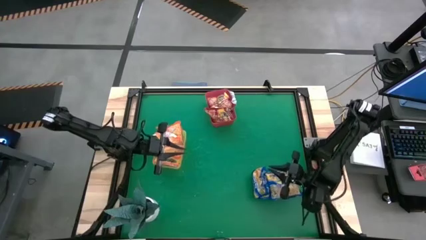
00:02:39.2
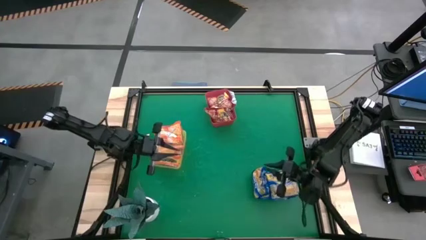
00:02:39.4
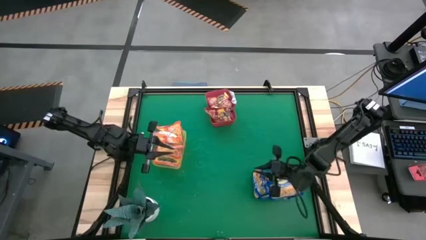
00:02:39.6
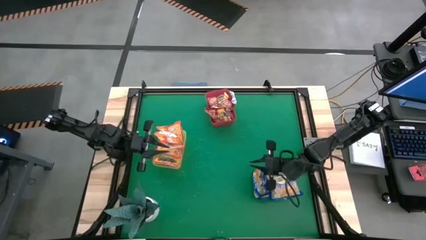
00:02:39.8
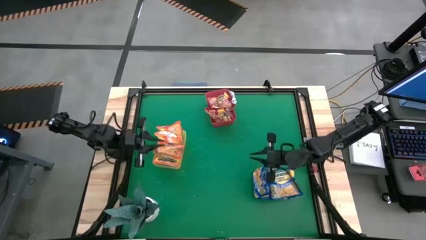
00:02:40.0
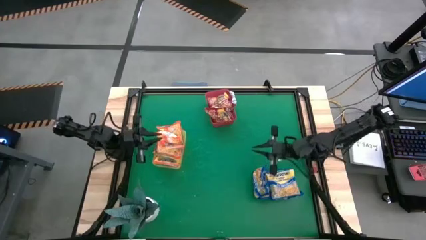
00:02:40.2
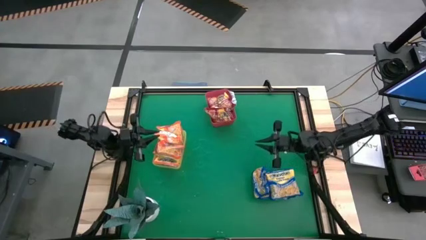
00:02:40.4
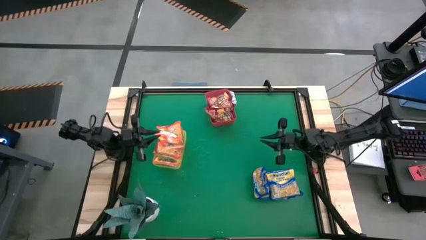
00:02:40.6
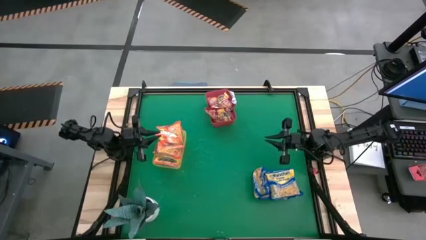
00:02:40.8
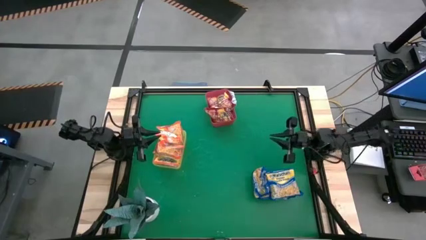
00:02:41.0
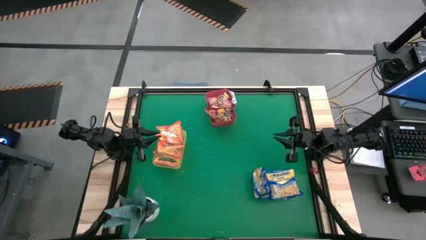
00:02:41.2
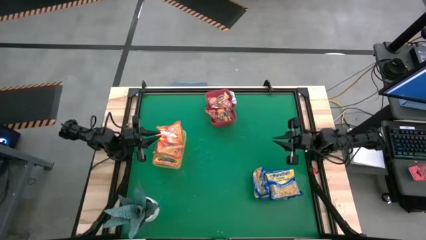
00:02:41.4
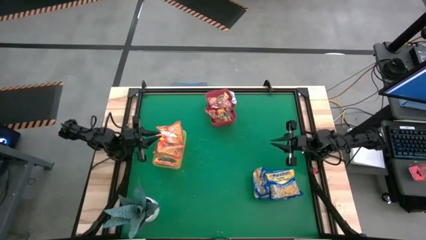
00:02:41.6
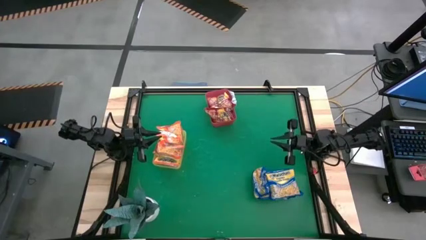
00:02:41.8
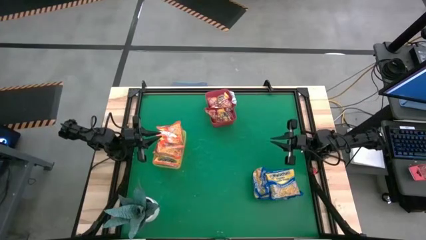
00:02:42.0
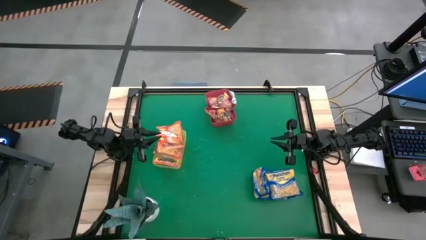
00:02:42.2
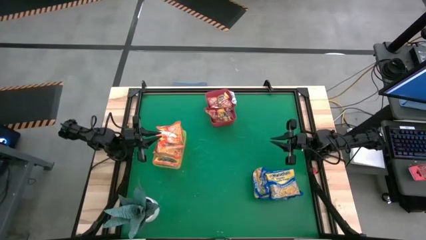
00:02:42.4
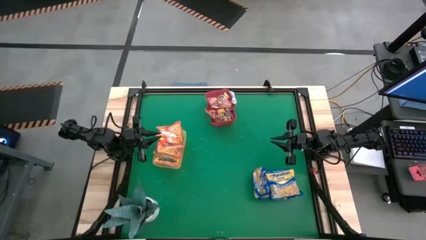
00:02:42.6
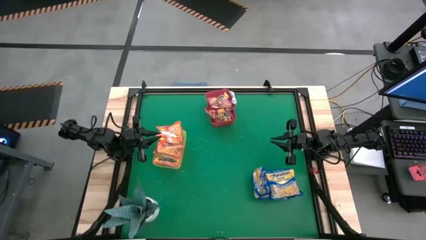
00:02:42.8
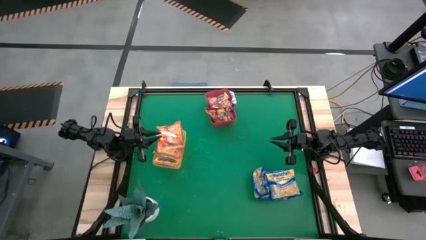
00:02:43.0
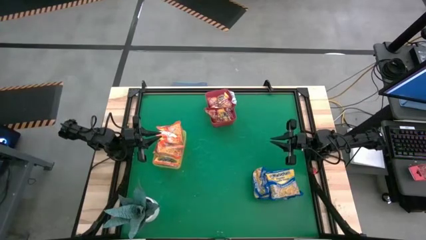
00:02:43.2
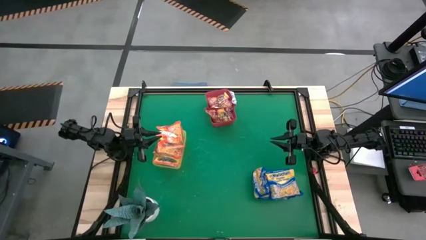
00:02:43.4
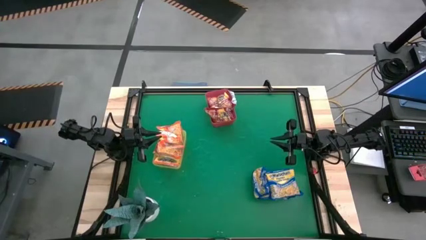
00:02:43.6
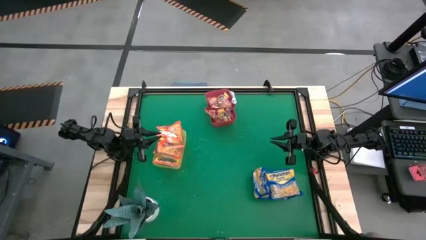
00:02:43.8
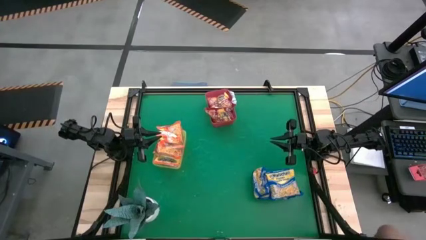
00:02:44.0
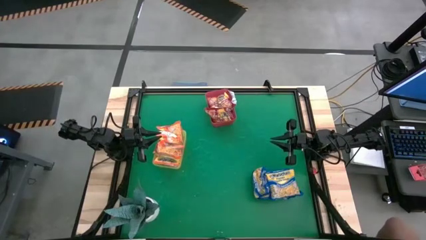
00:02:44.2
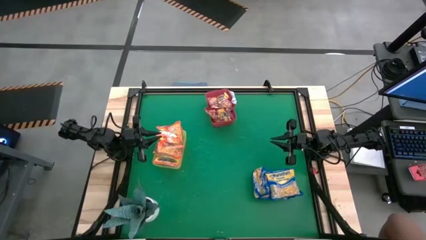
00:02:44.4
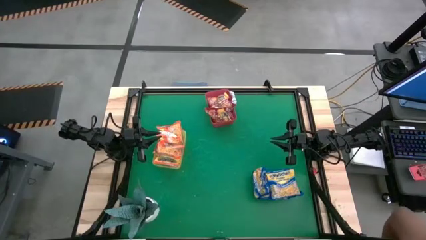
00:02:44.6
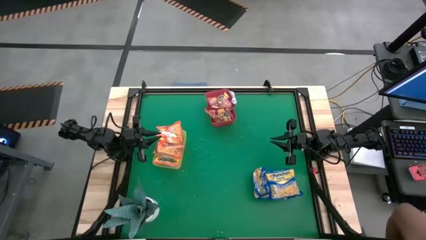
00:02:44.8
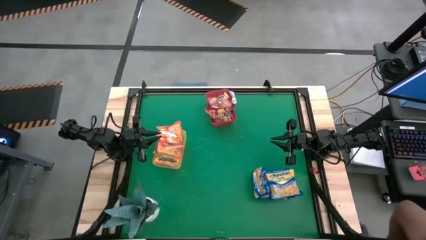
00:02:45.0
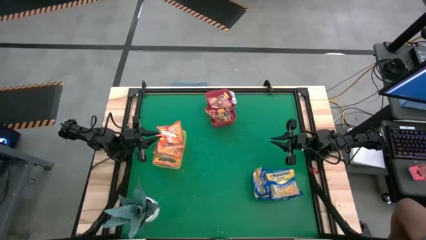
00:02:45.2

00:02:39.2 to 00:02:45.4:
Task: Sort Maruchan noodles
Return to Home Position

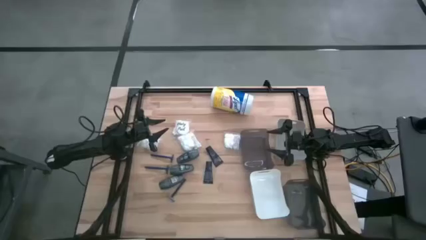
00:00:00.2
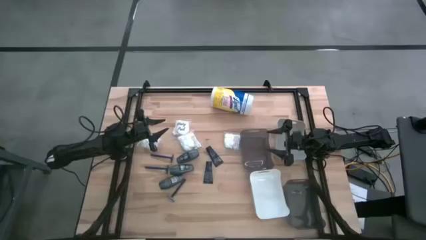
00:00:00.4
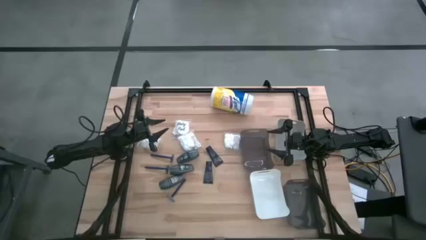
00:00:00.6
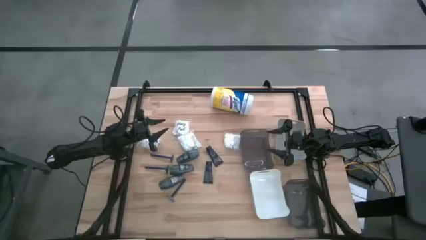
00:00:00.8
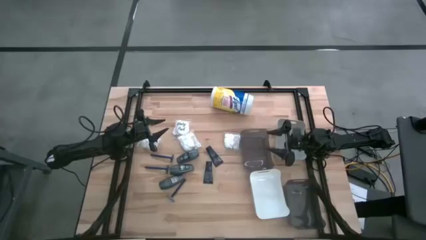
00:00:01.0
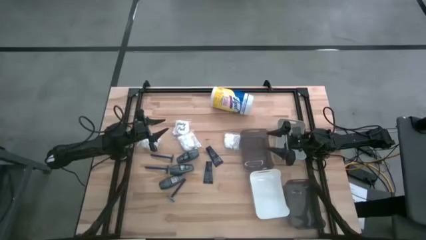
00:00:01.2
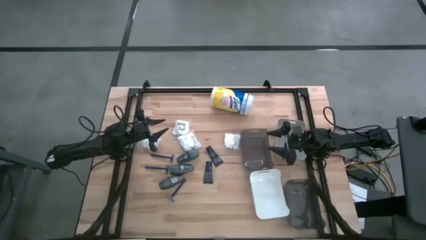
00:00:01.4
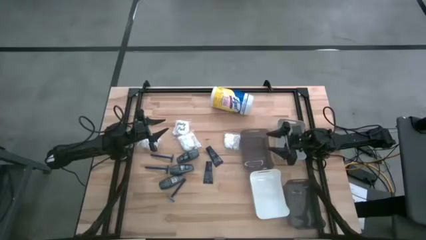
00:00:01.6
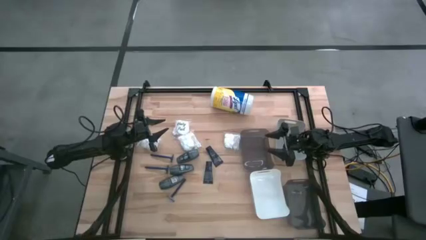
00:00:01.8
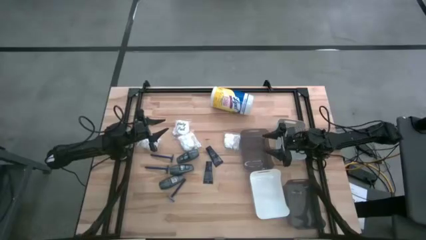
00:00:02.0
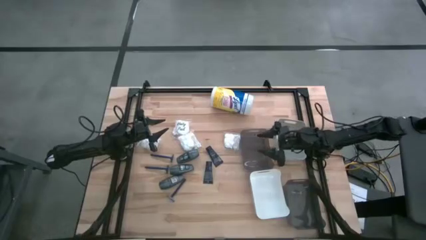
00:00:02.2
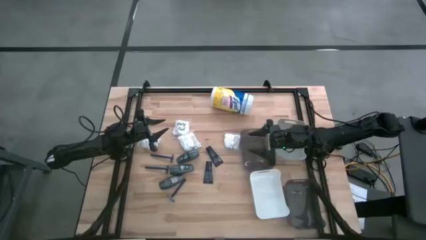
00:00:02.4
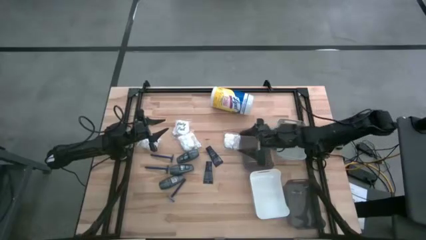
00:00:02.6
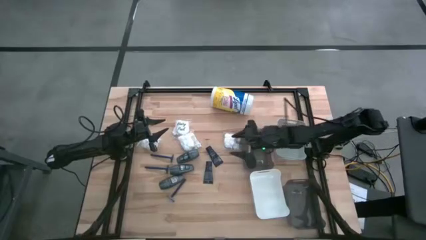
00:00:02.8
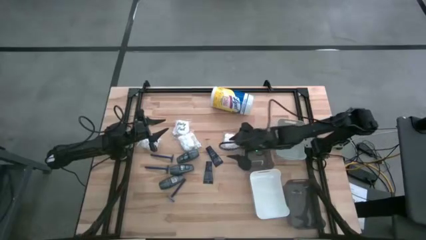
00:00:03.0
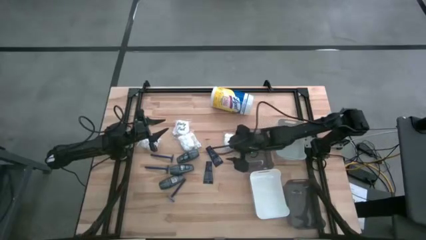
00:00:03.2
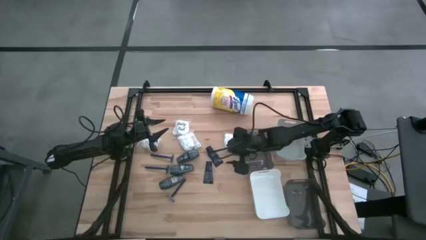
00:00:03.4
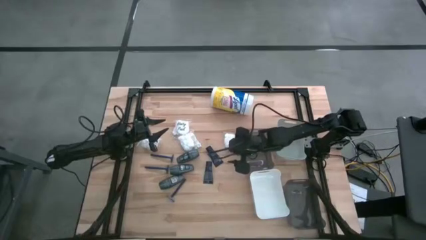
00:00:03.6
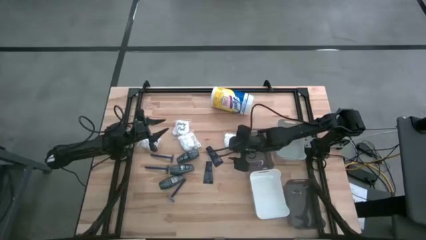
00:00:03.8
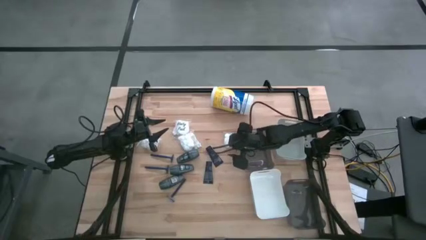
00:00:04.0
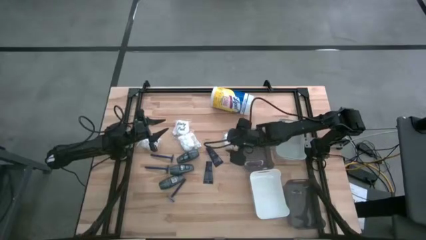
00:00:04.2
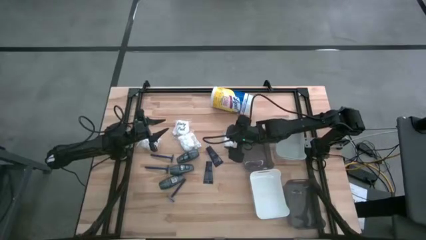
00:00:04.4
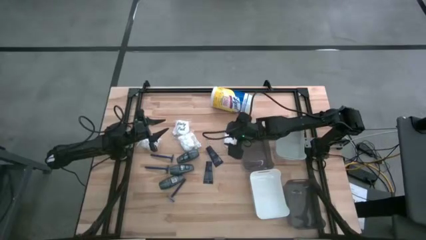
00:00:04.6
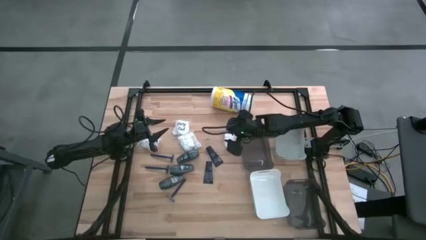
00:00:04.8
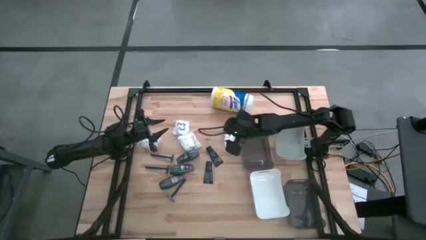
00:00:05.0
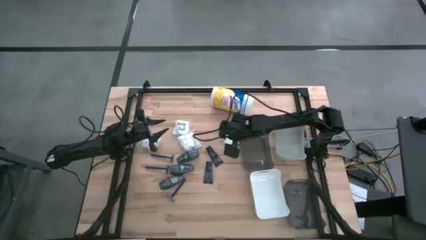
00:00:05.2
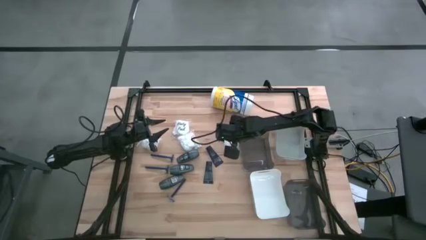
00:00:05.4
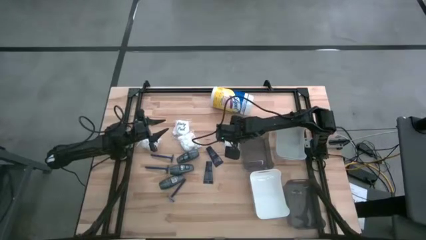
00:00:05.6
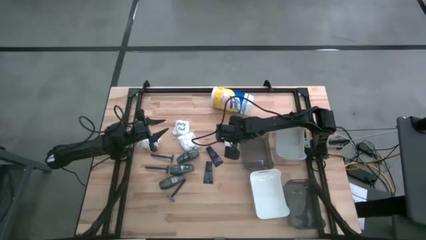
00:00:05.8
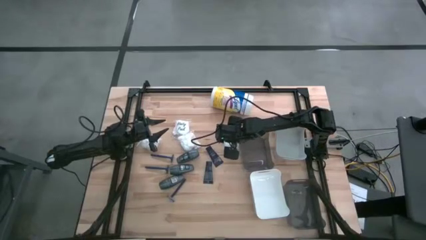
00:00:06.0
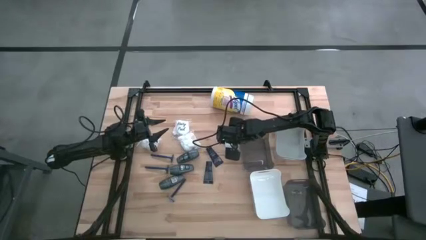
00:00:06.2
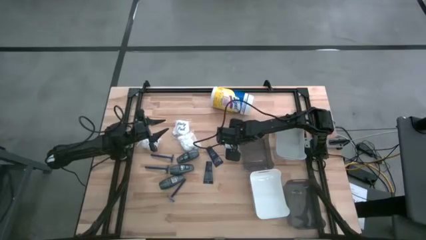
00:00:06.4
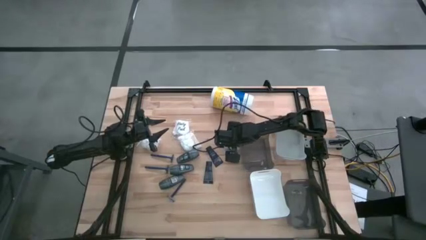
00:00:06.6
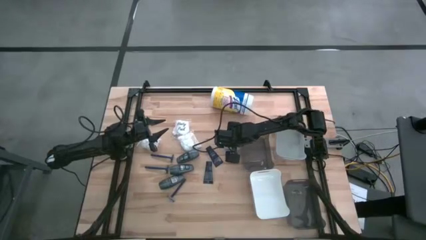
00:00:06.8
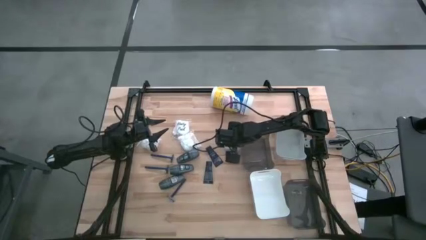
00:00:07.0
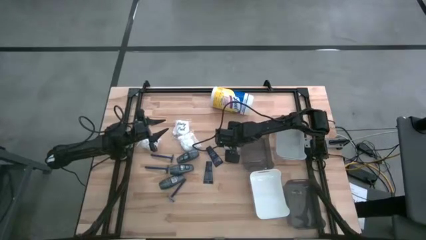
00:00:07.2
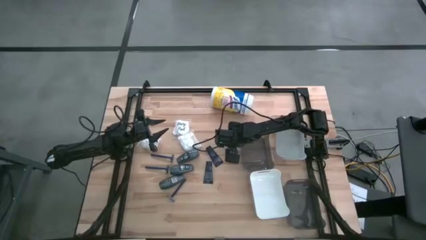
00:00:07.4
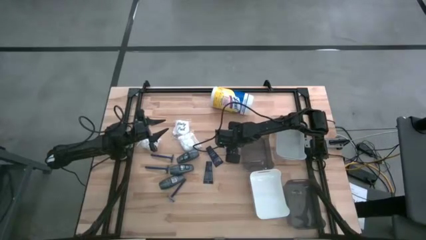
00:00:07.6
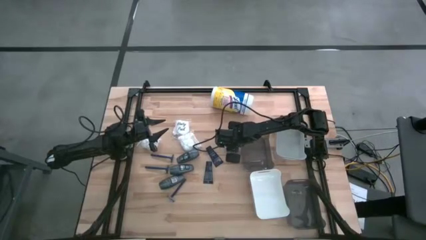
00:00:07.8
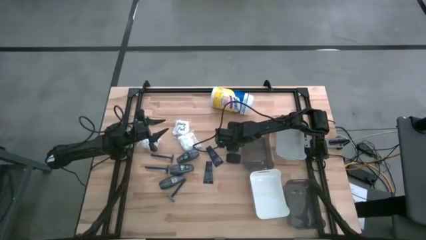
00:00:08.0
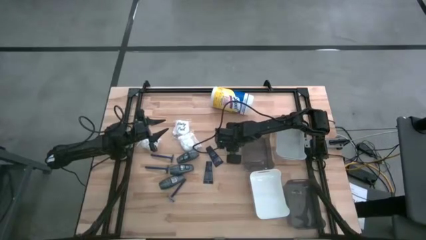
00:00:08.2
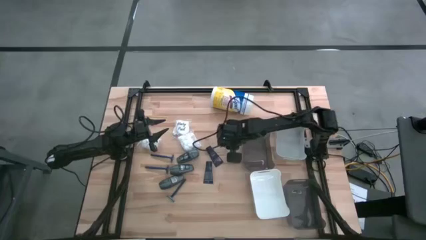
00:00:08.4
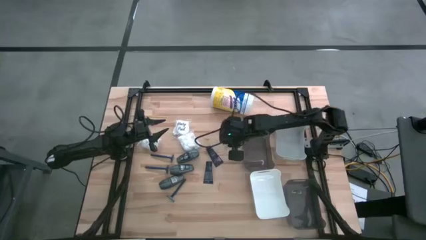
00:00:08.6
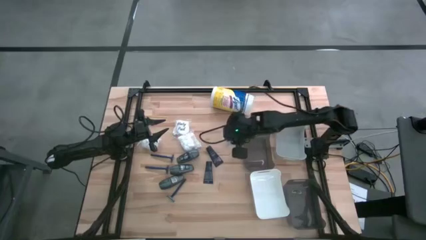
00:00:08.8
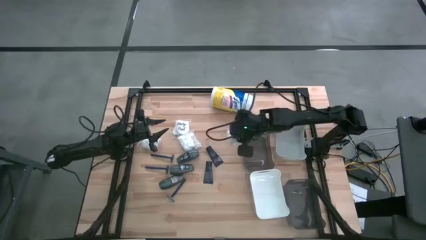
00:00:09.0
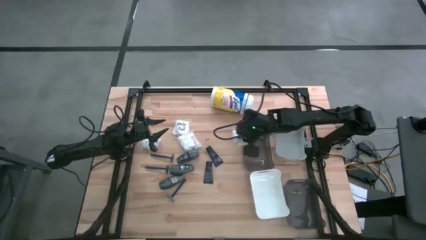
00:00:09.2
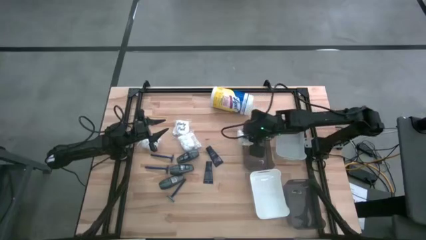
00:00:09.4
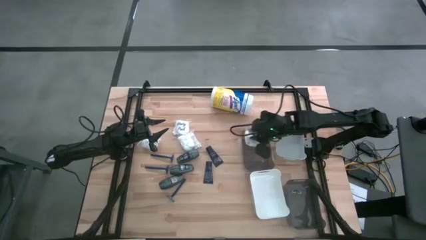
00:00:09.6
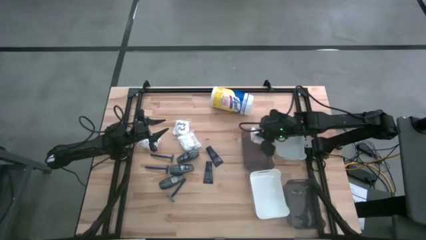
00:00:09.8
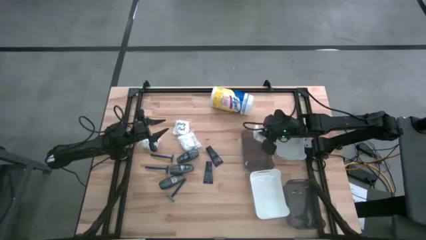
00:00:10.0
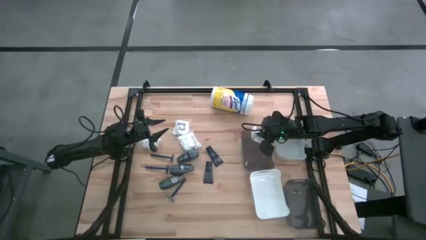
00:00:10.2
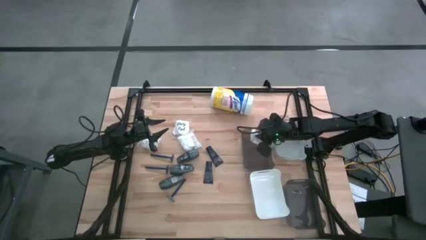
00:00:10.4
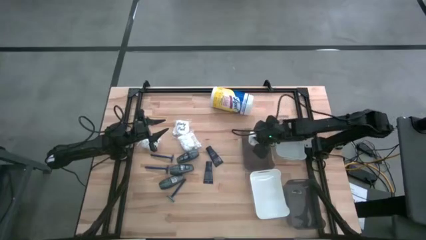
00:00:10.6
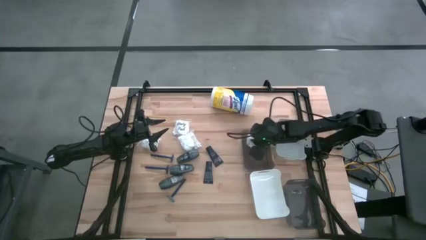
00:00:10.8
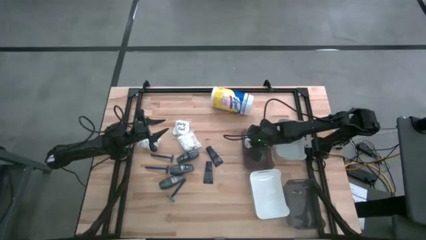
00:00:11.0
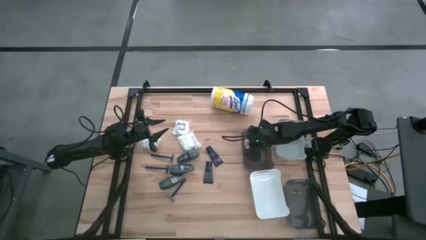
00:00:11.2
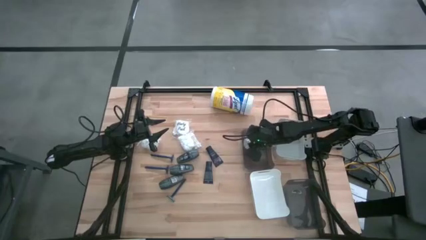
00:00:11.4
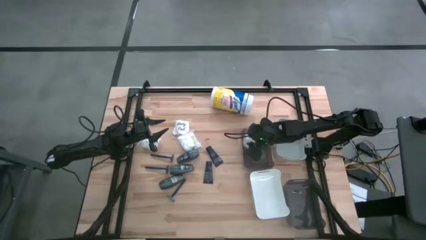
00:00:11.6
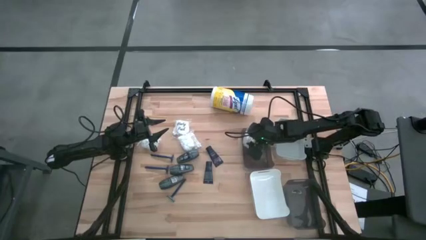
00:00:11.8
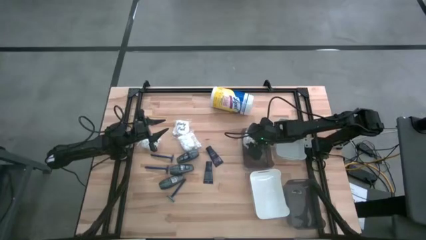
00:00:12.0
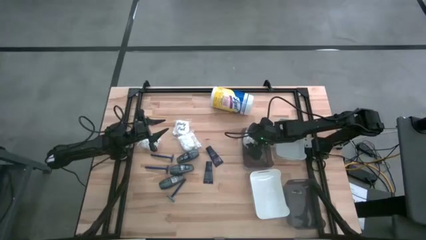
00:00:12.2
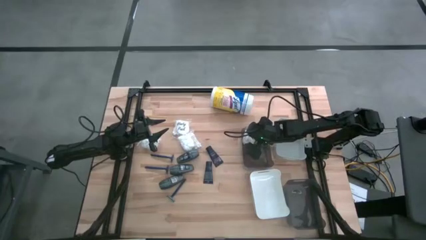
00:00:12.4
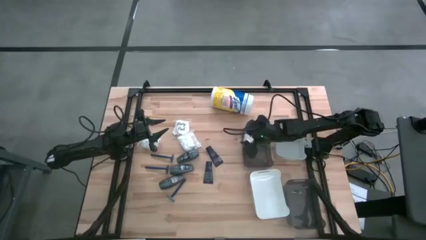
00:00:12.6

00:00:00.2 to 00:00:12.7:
Task: Pick & Place Travel size toiletries
Put the right cotton pack into the top black bin
